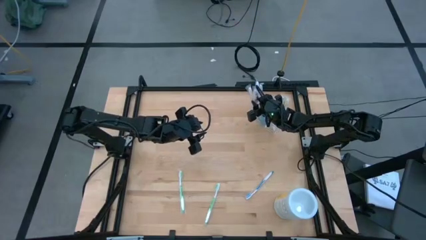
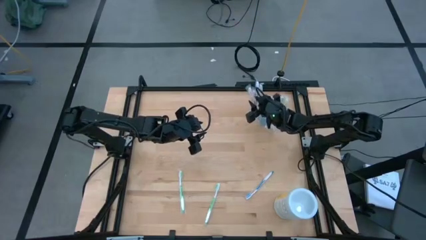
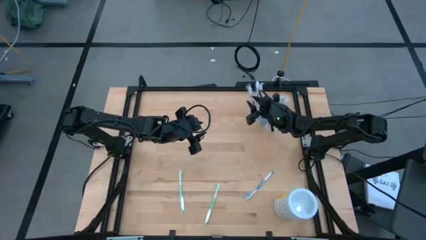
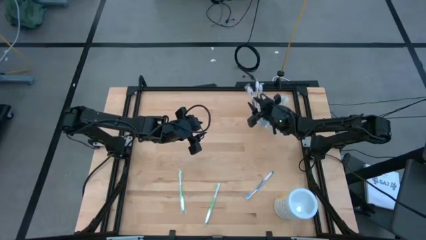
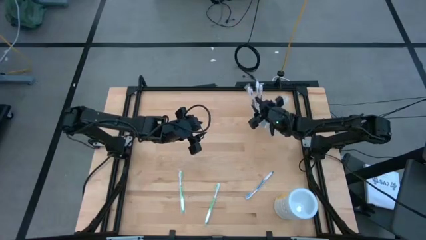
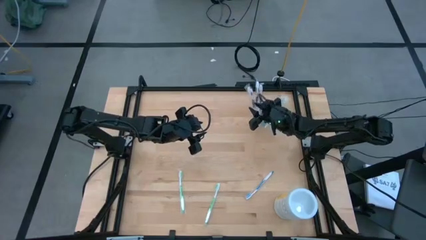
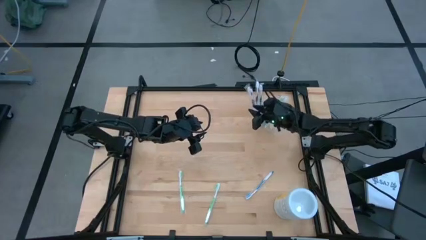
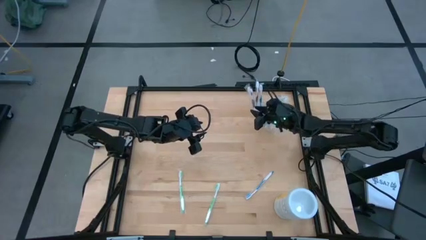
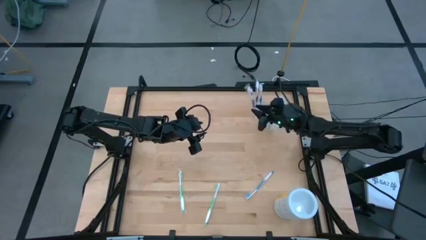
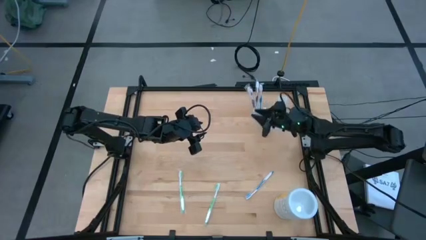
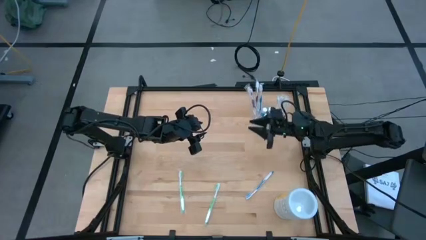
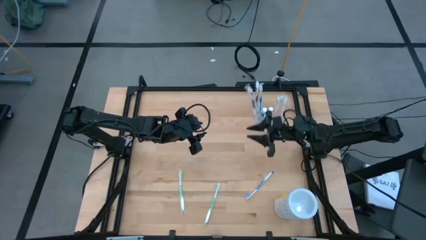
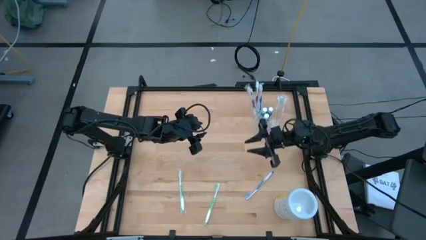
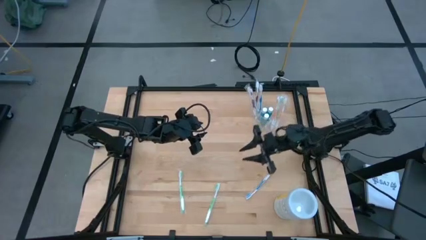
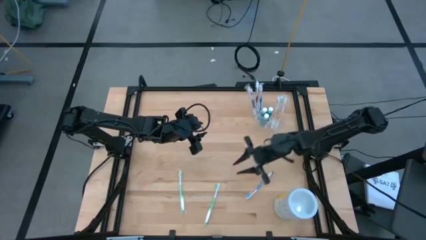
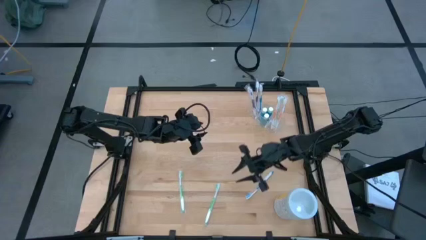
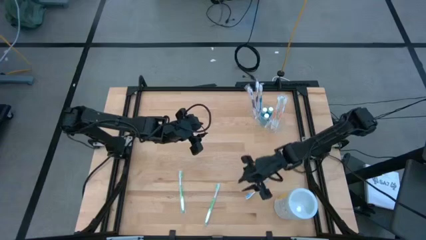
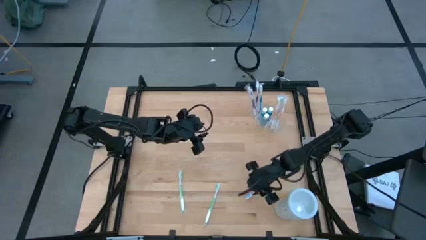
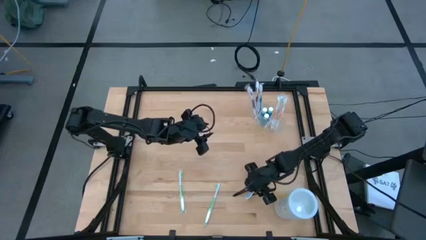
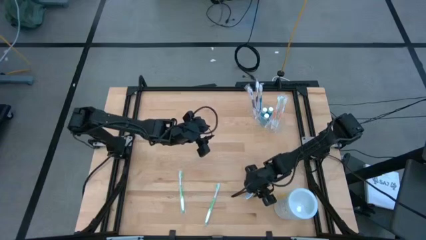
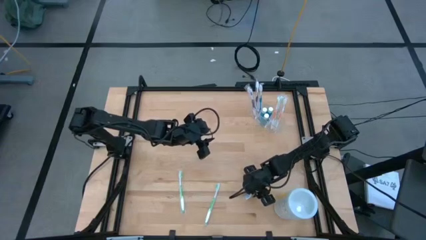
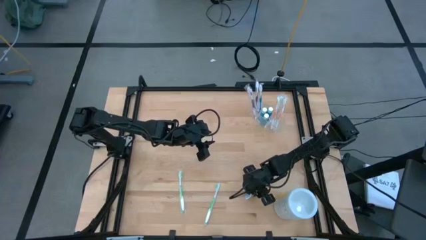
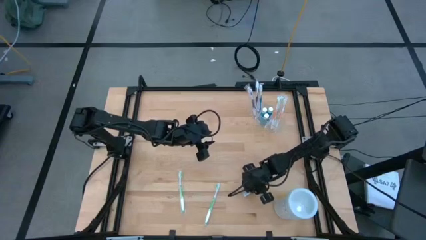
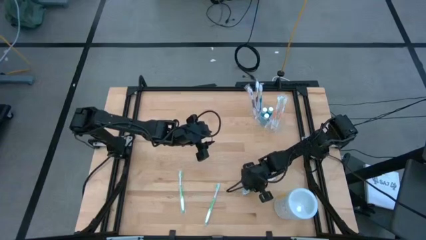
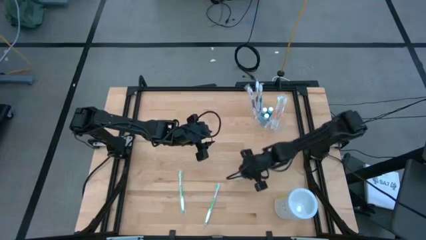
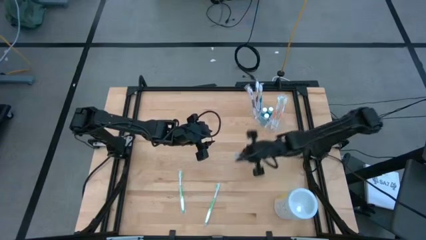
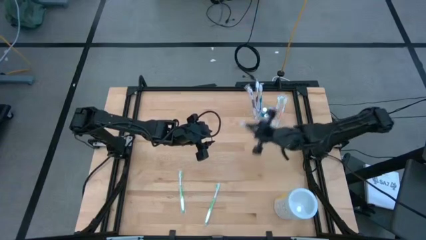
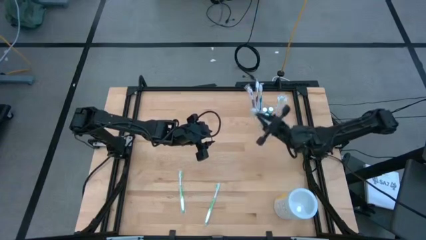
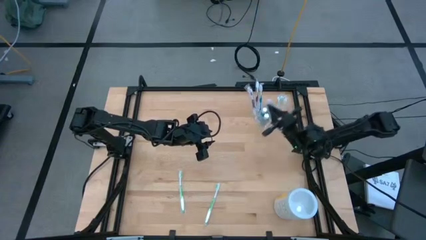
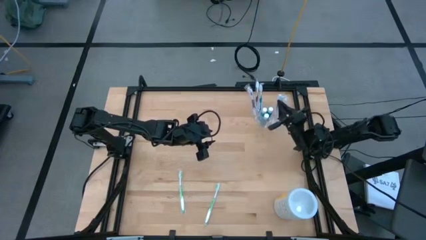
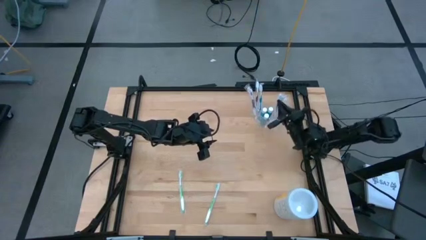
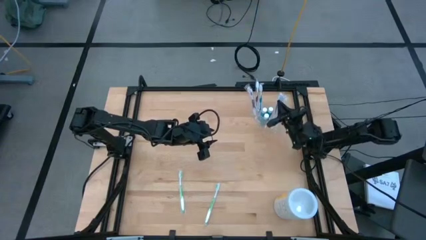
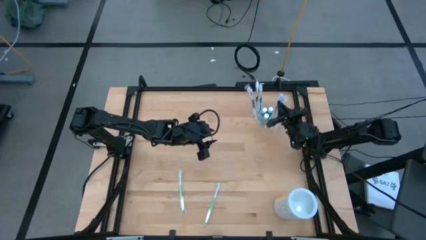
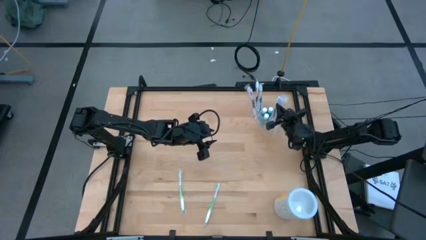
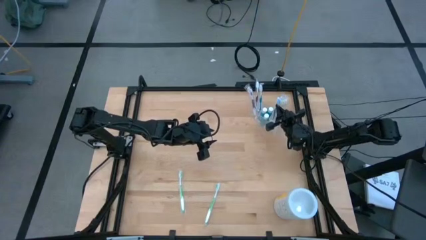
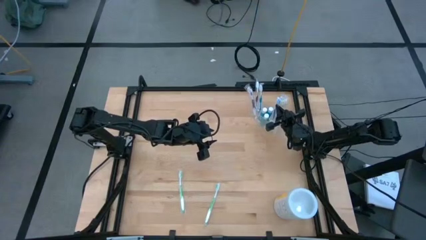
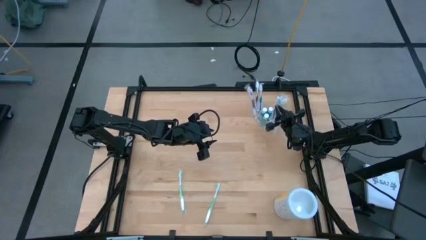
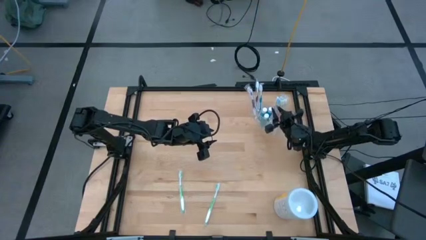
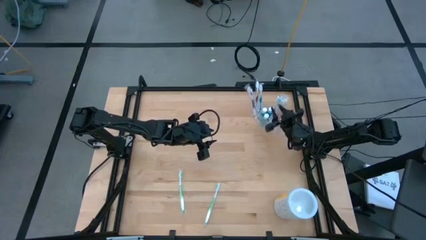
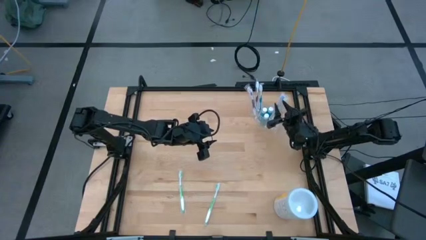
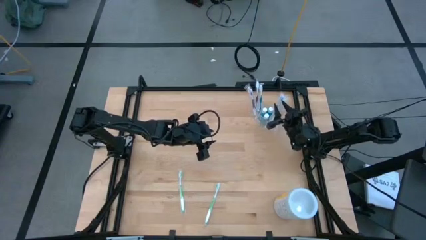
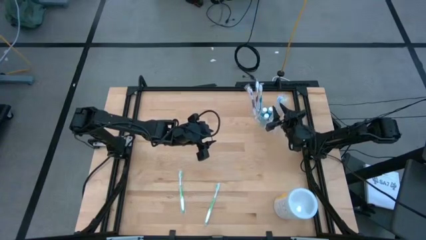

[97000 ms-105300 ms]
Task: Pick & Place toothbrushing station
Put the blue toothbrush into the transparent organizer

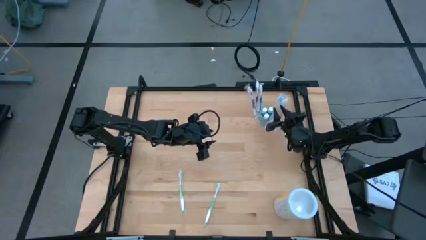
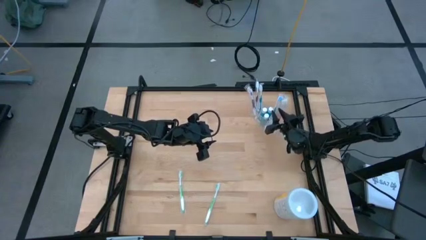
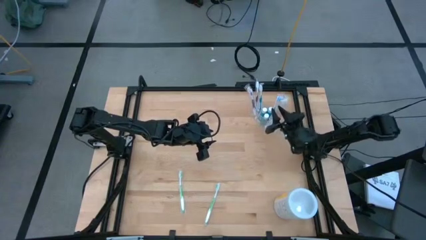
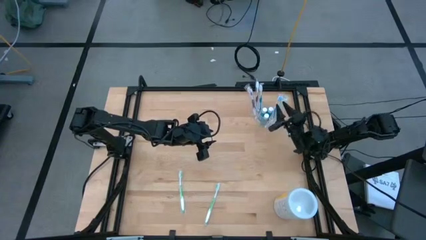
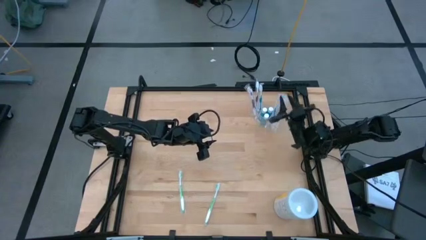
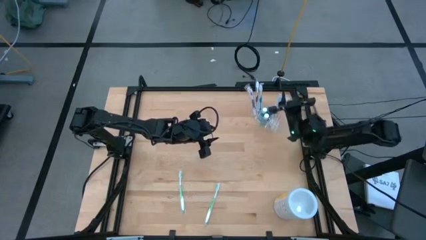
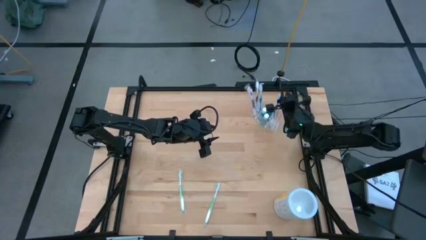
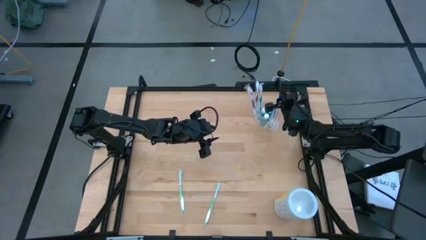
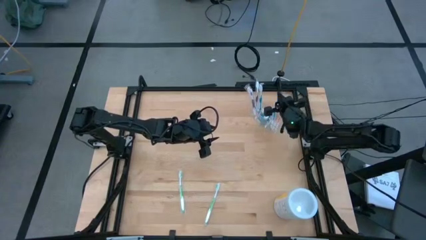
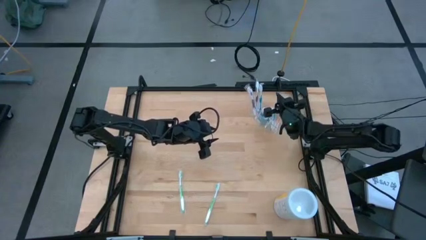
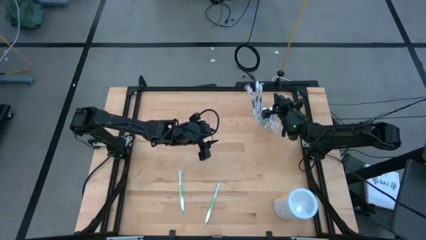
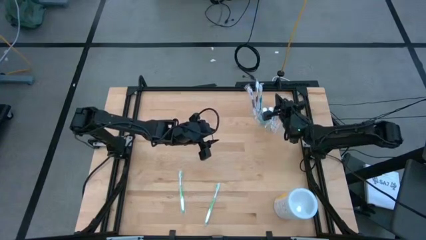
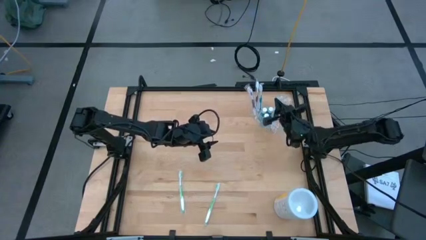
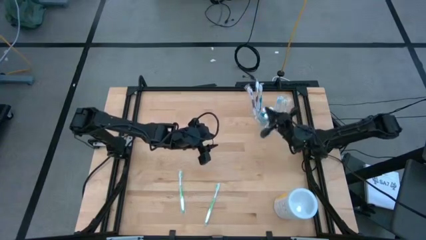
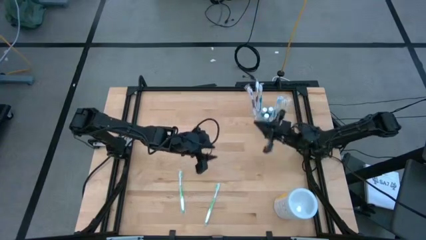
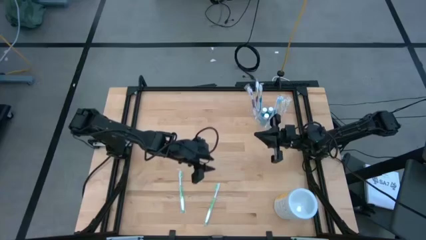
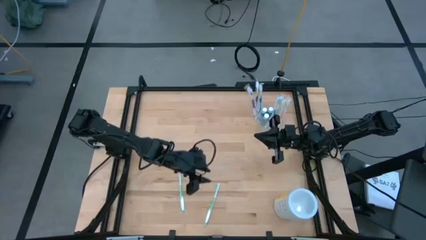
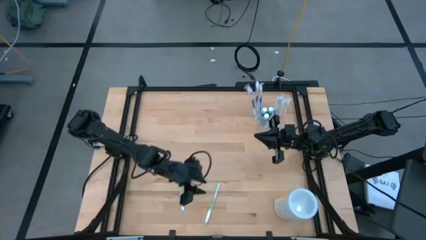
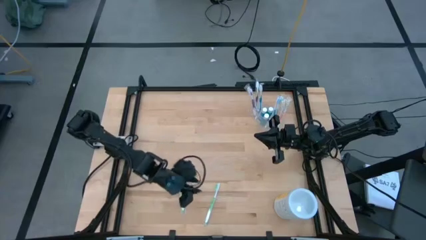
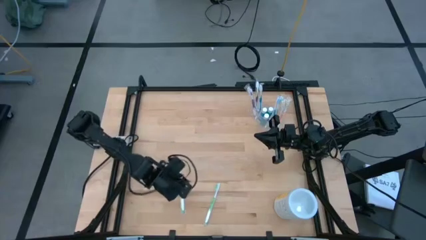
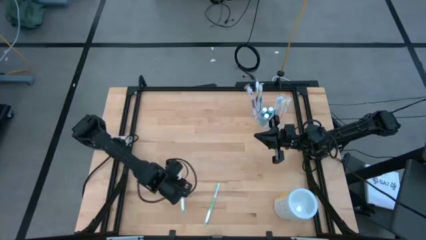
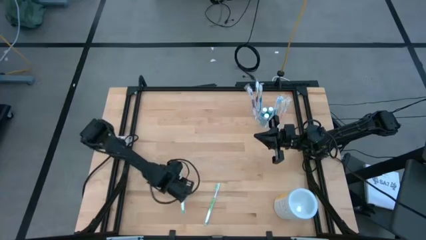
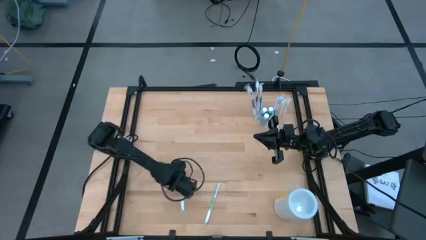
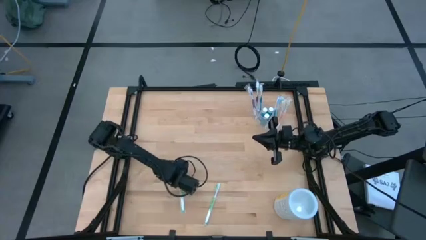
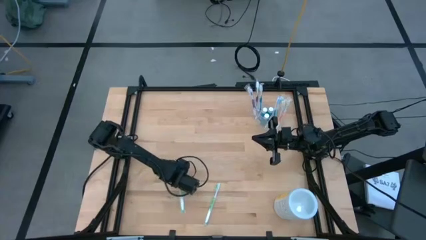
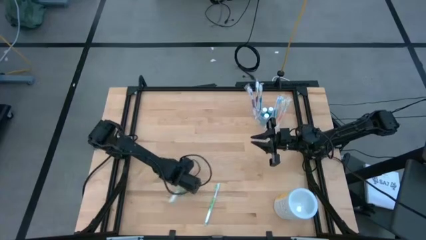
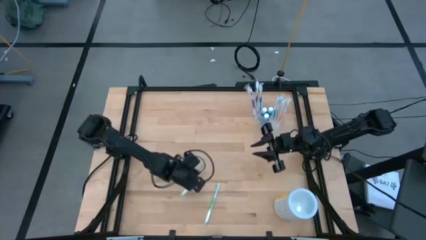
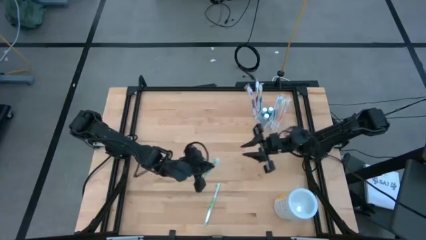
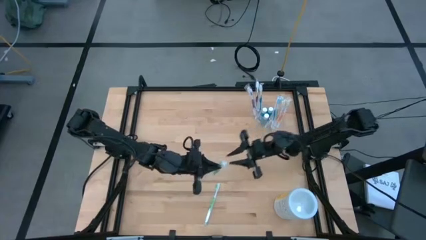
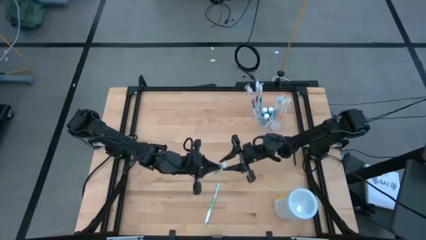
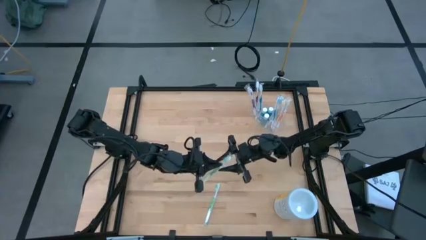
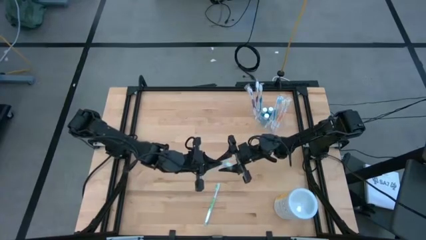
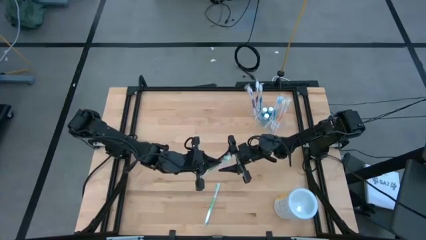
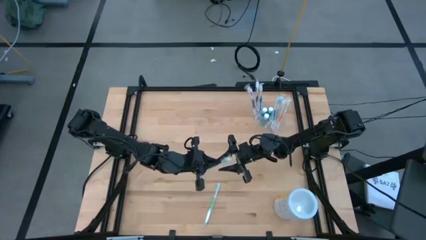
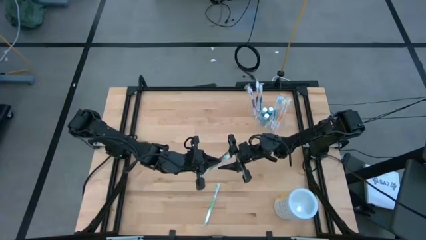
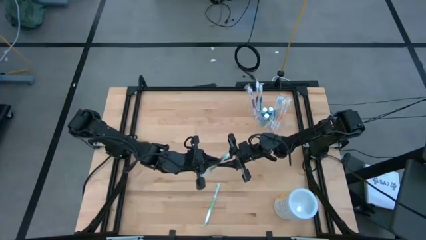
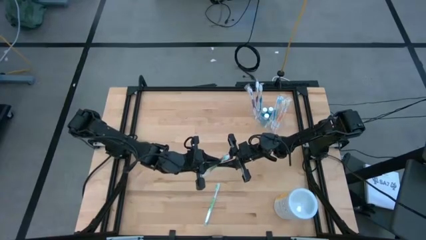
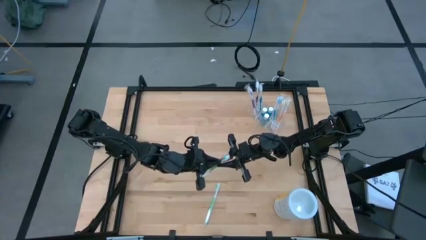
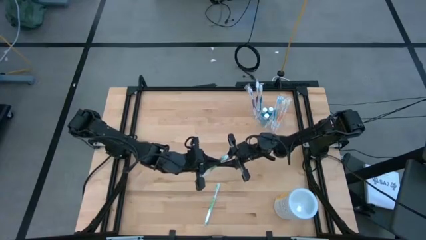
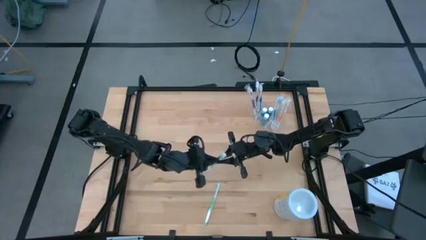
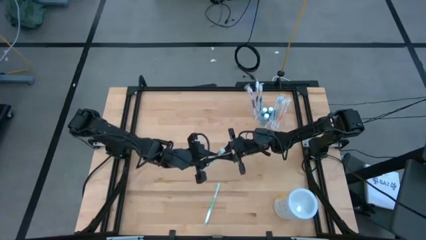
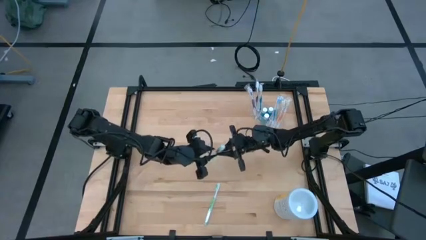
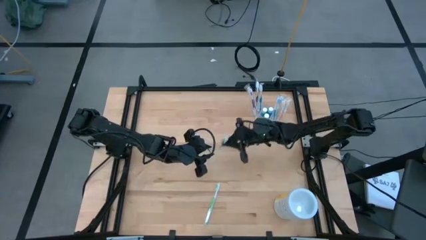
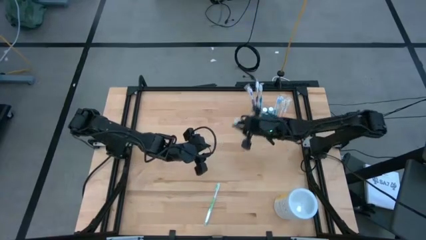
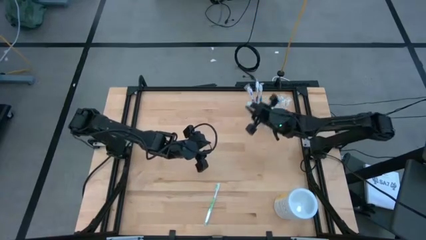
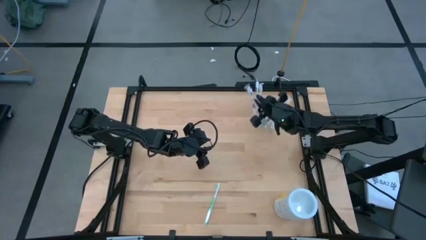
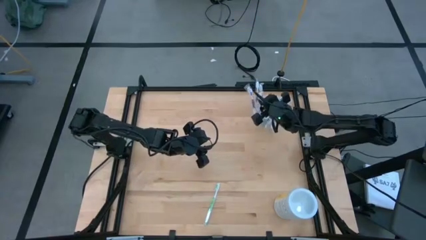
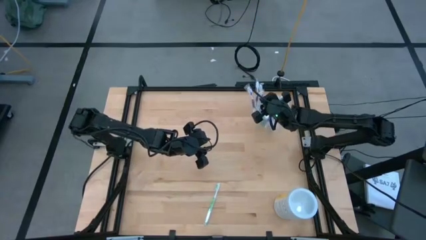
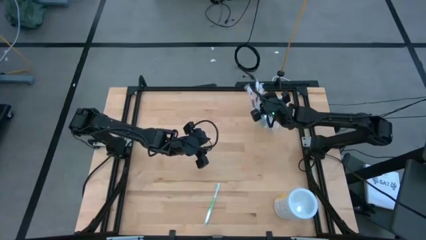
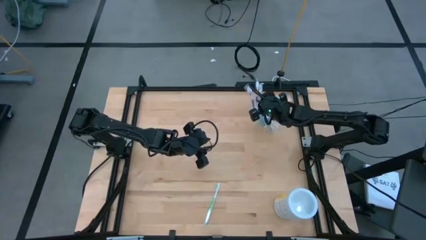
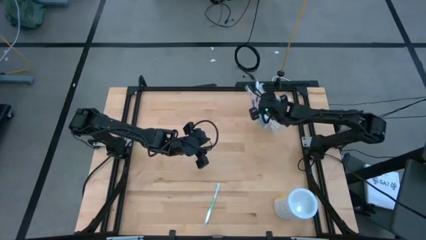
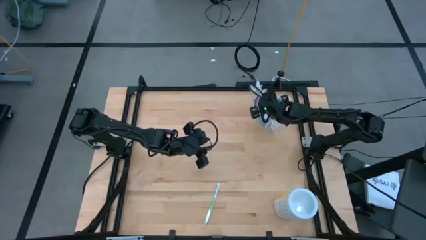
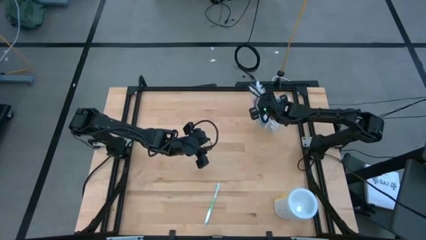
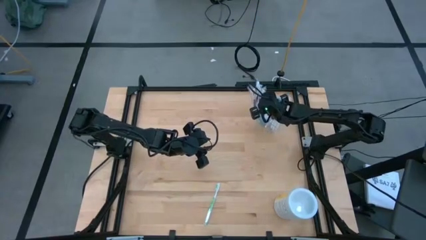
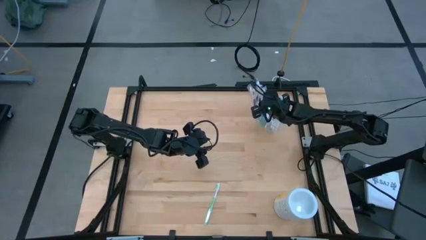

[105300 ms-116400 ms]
Put the left green toothbrush into the transparent organizer
